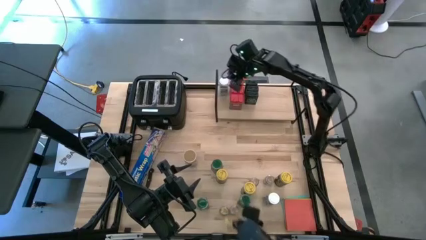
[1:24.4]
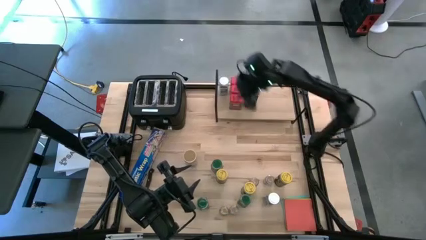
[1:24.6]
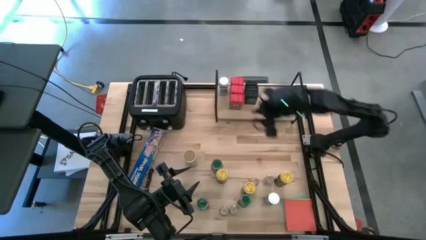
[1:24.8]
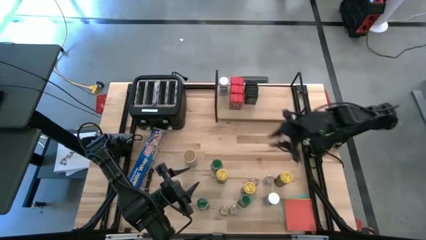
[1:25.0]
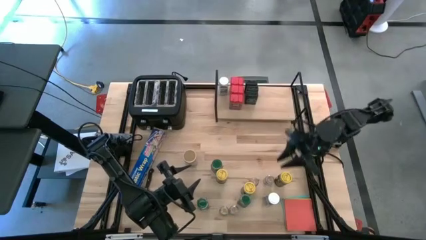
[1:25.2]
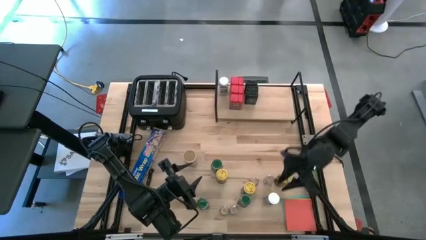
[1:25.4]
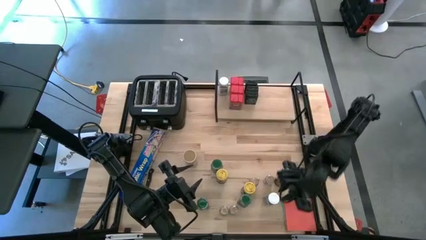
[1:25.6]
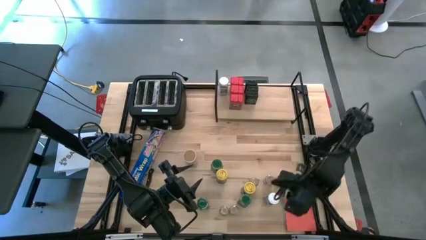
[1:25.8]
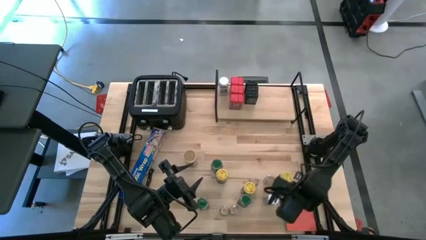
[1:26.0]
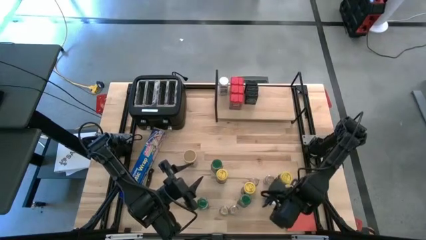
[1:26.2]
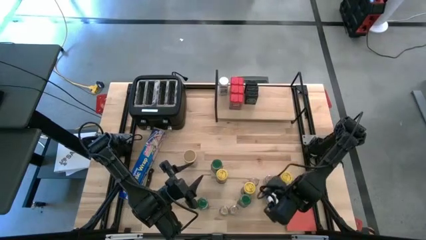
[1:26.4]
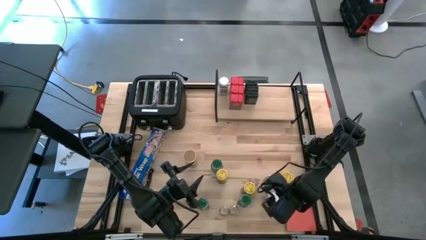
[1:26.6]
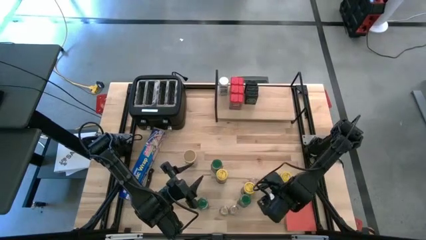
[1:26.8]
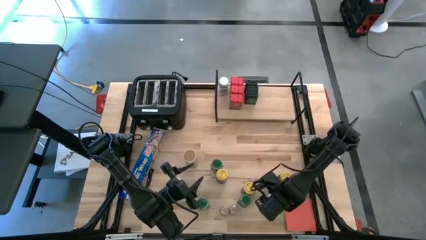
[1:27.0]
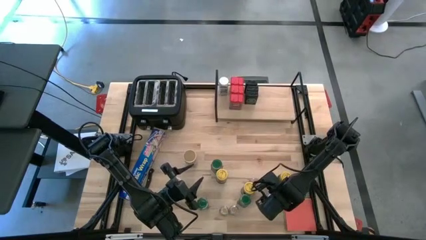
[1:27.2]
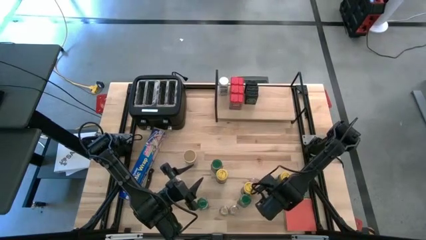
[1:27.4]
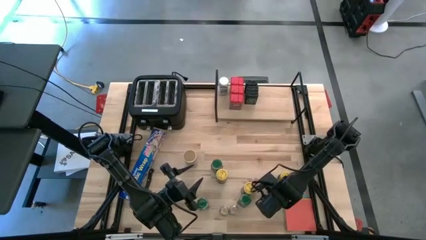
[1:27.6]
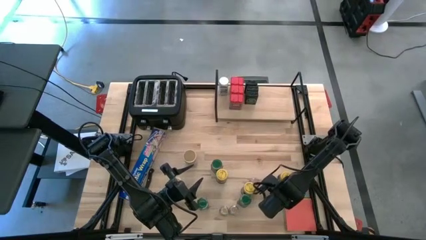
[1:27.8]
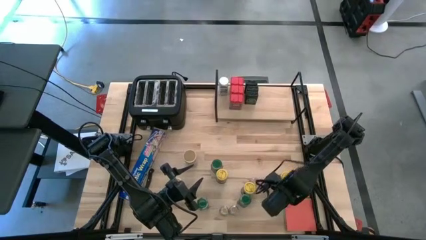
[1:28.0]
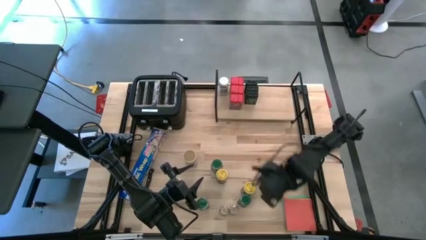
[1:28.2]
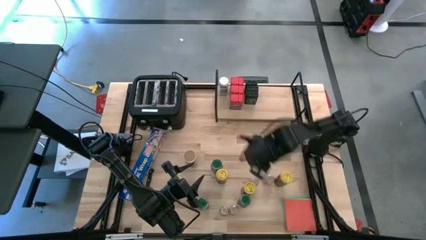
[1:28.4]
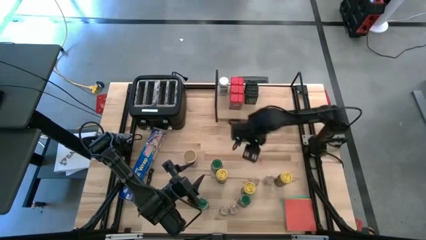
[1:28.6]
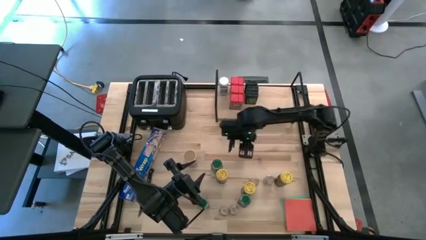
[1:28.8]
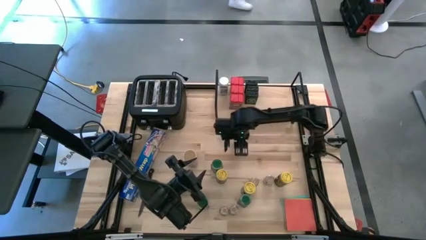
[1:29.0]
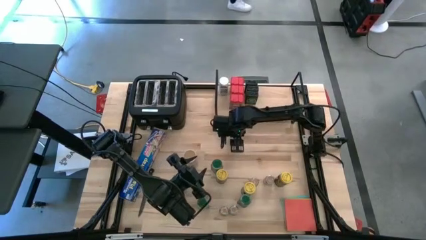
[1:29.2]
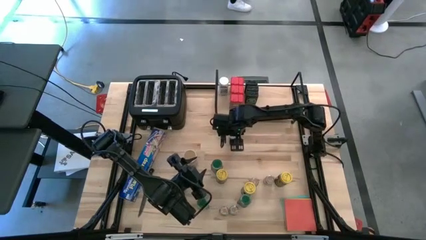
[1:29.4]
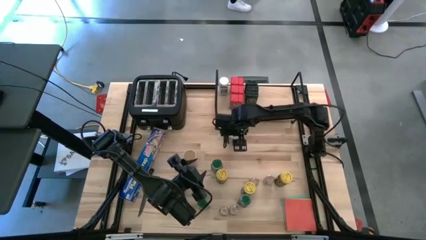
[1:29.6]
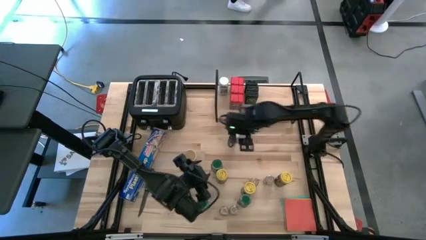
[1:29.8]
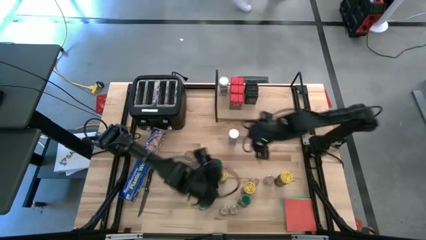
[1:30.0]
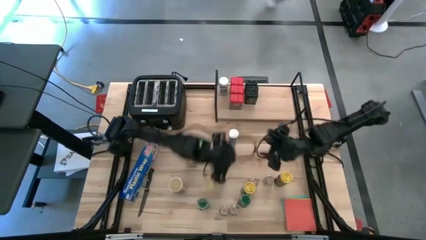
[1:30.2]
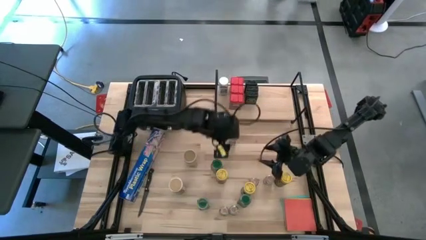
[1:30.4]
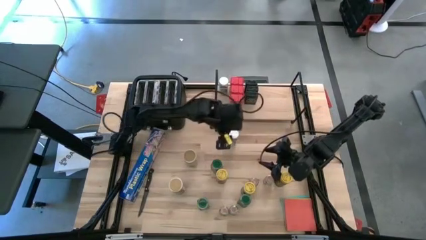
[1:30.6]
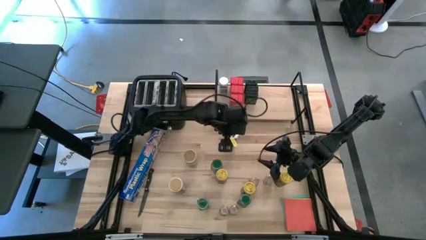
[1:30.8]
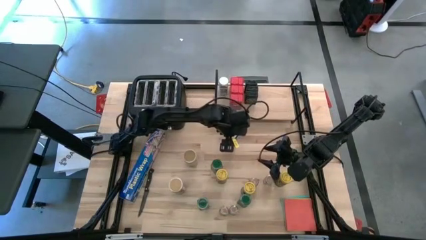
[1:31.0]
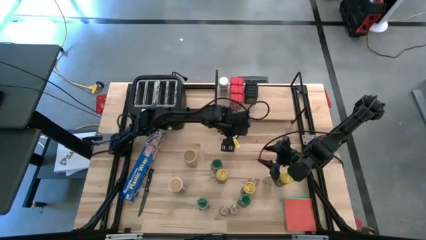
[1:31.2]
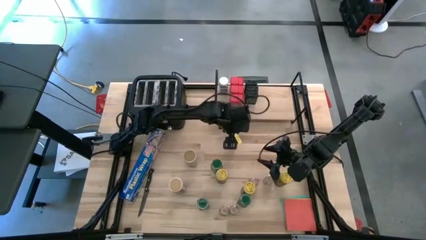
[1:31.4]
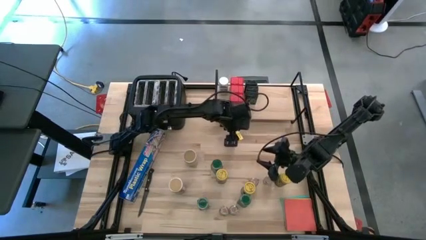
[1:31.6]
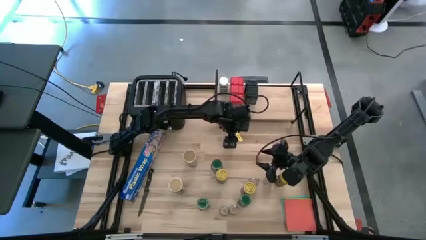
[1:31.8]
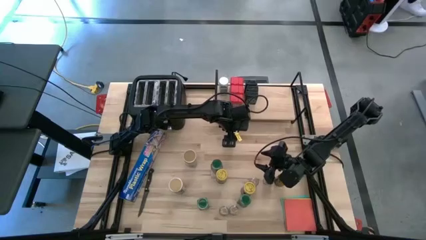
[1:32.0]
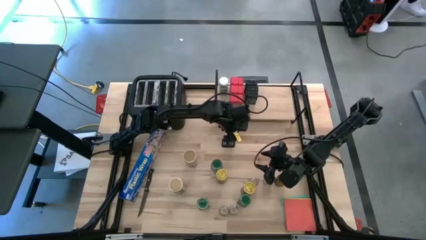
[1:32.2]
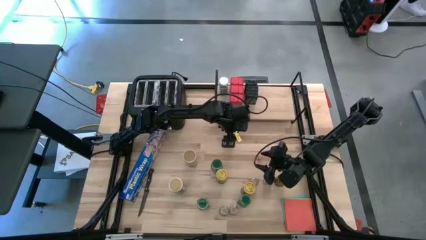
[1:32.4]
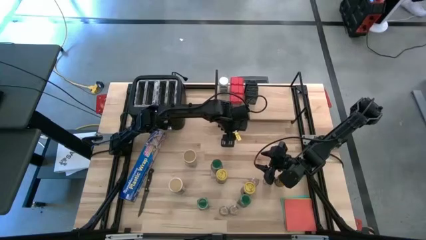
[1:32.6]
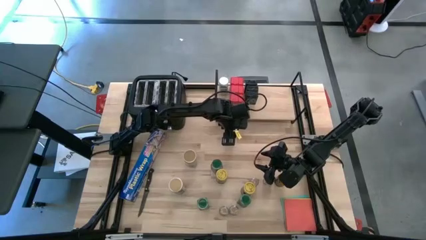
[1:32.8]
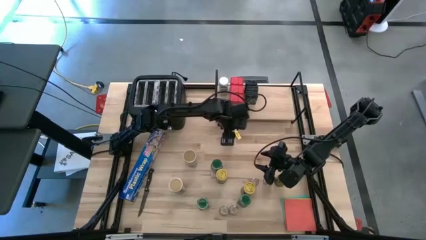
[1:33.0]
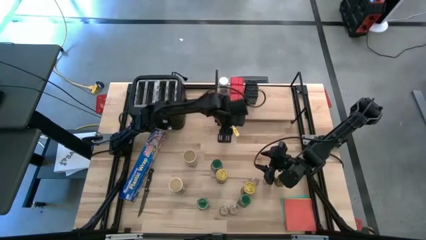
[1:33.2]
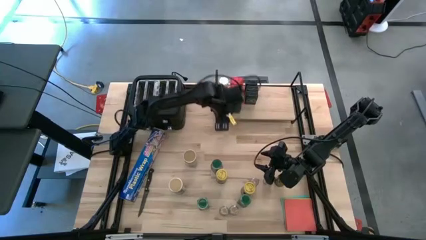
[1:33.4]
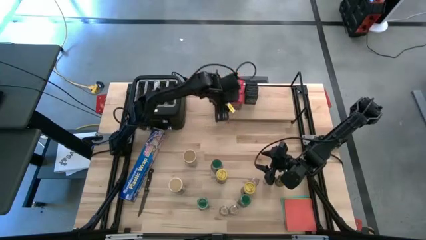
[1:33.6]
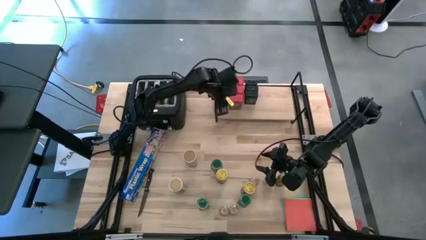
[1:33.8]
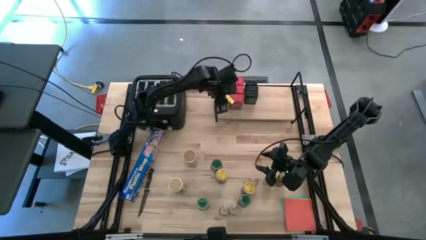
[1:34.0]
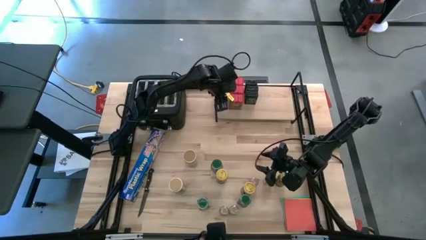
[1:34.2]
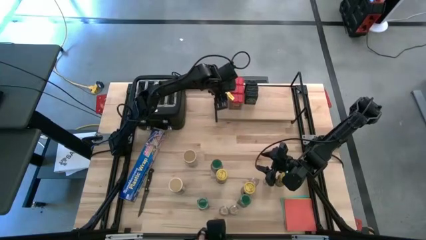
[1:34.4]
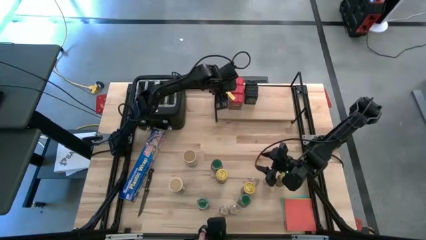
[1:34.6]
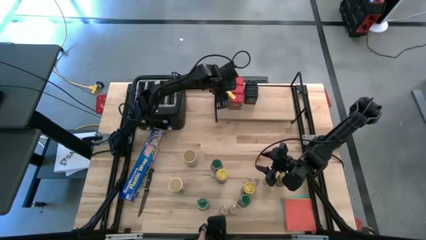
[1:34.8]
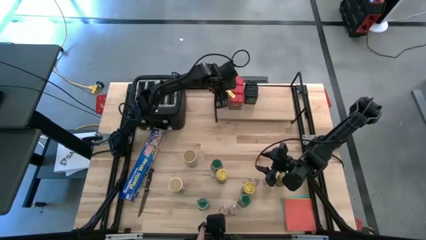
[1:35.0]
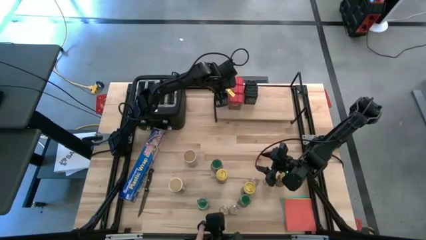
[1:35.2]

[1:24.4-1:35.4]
Task: Shelf spices
Put the white seasoning bottle on the shelf aligned with the other white seasoning bottle

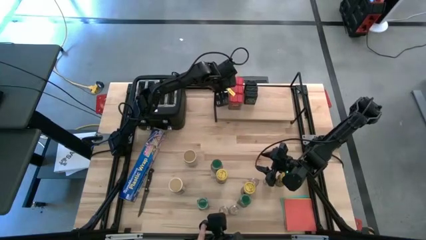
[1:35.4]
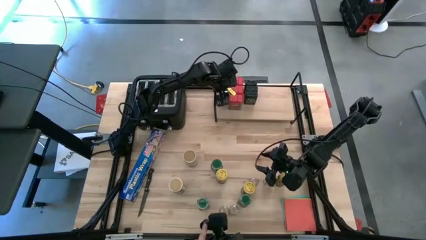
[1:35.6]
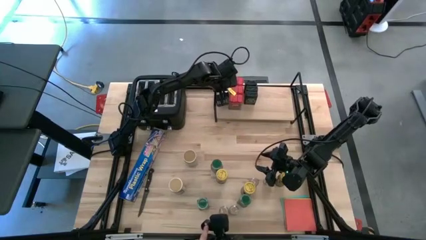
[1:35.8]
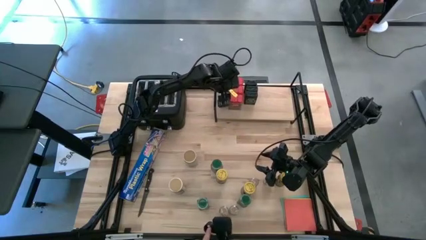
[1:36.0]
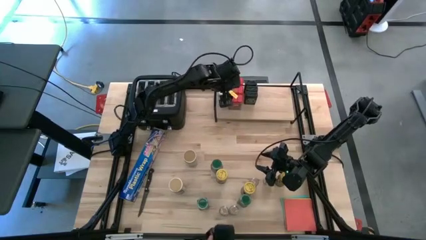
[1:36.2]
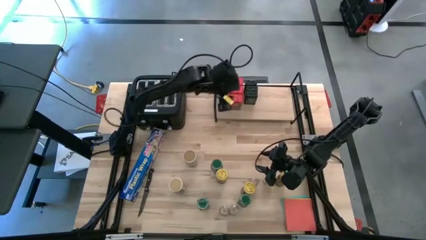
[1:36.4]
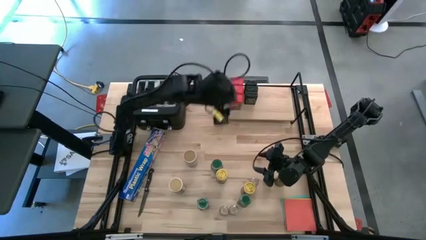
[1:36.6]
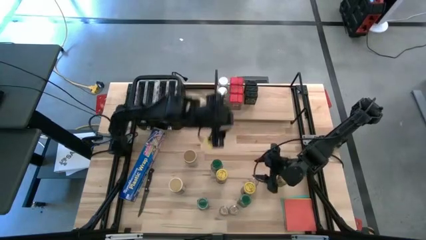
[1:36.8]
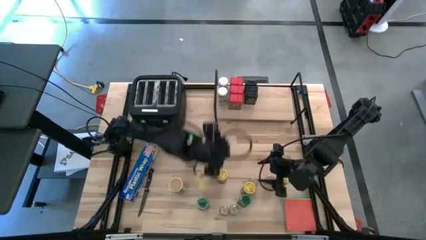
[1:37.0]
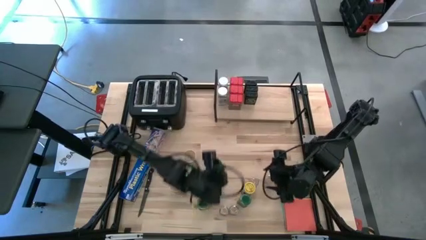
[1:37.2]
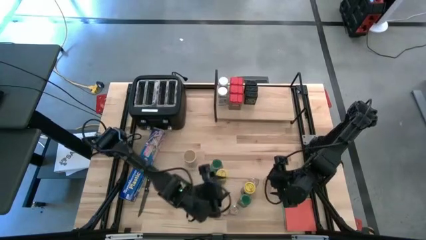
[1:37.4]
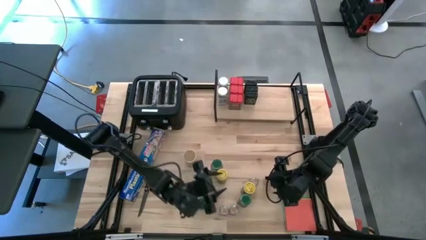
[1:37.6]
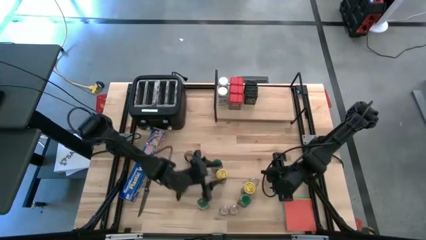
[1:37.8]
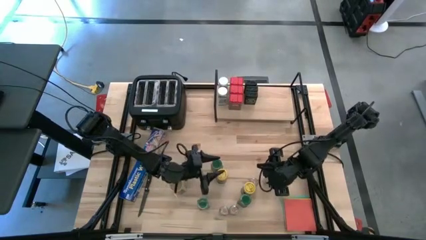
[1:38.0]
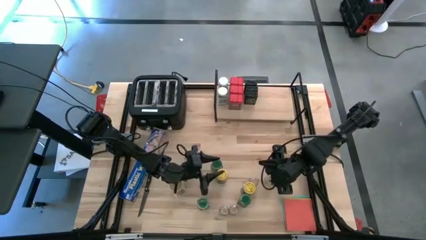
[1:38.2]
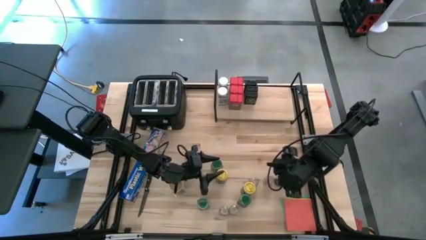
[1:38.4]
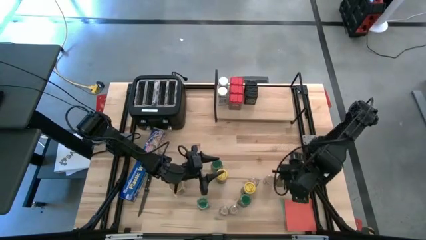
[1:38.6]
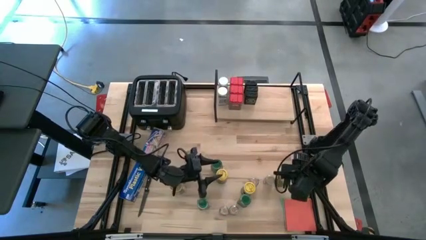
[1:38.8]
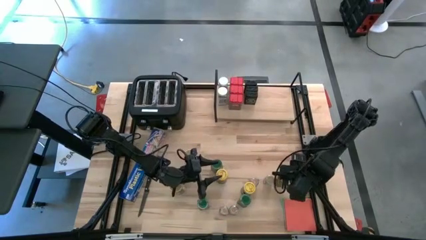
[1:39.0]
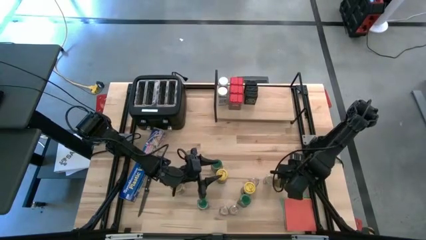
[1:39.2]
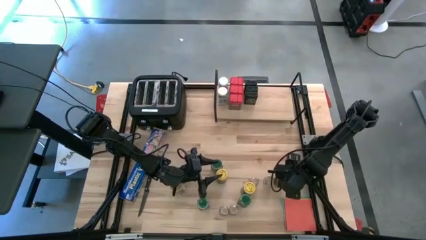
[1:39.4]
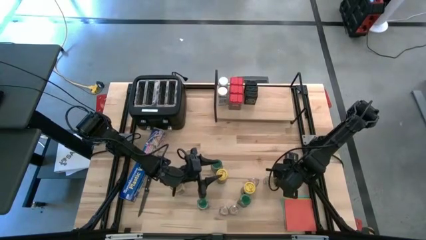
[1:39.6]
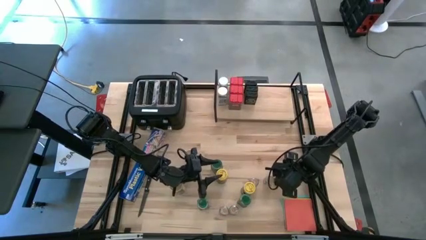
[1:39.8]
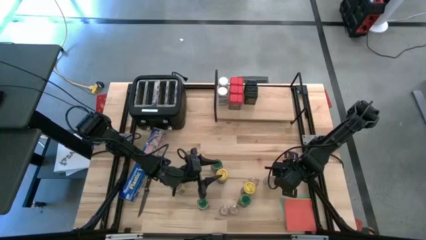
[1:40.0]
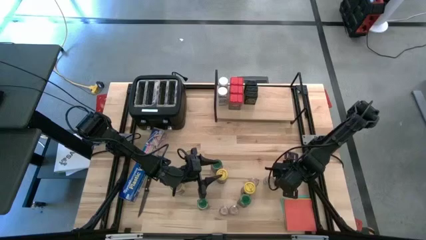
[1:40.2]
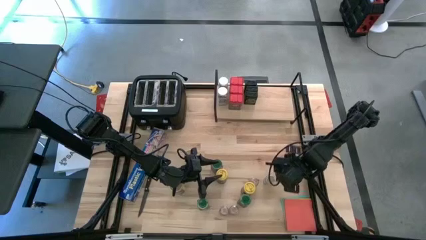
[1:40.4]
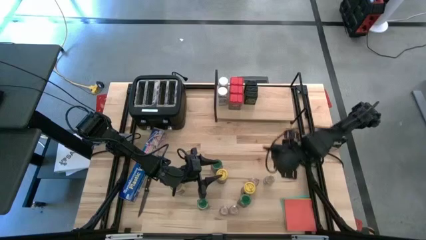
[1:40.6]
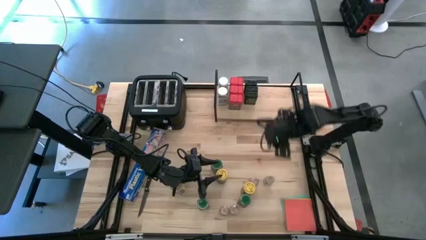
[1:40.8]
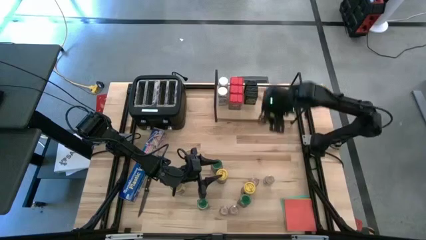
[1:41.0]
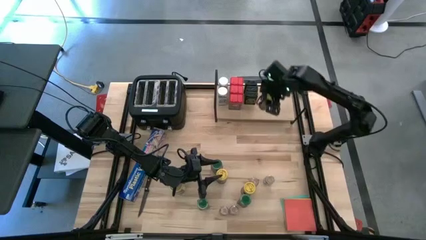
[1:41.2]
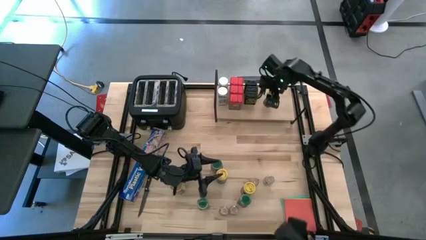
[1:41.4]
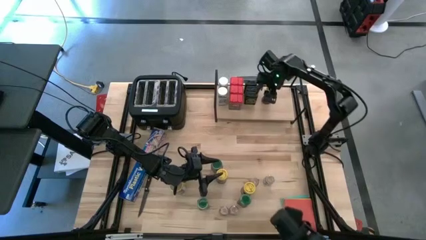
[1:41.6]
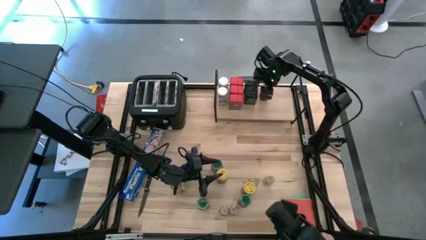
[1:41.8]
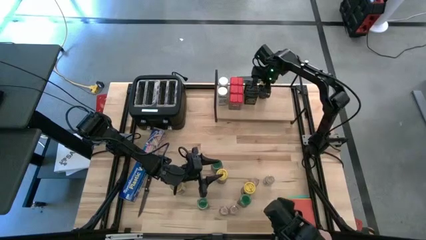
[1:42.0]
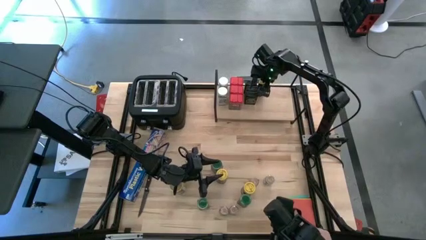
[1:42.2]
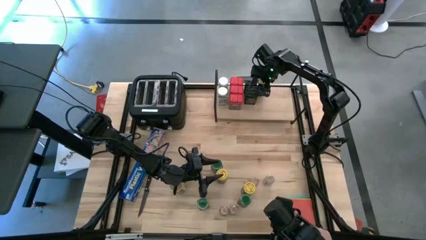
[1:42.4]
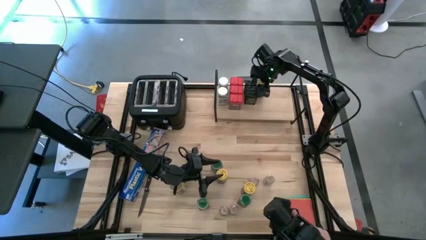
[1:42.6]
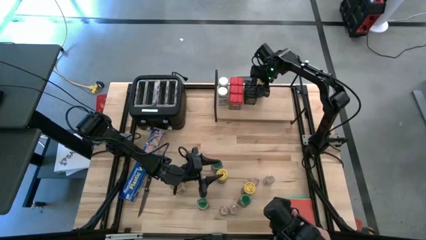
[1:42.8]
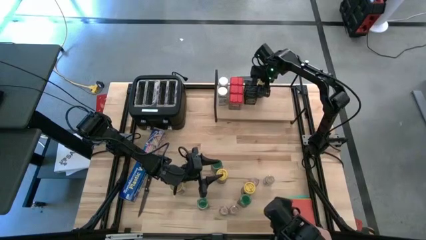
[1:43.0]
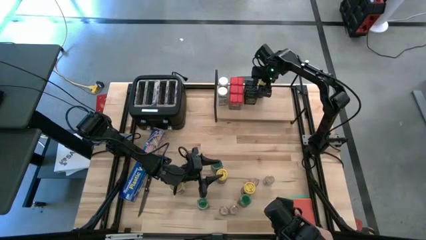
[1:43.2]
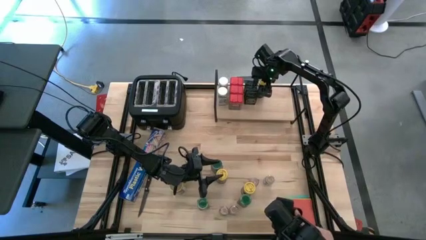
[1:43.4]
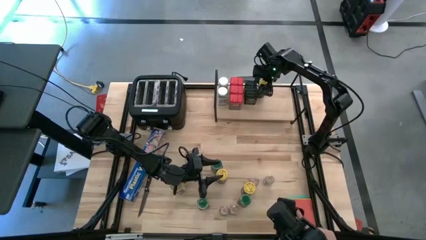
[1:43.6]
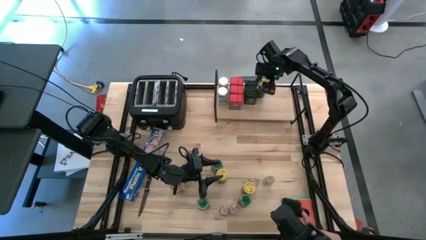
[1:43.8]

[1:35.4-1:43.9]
Put the right yellow seasoning bottle on the shelf
